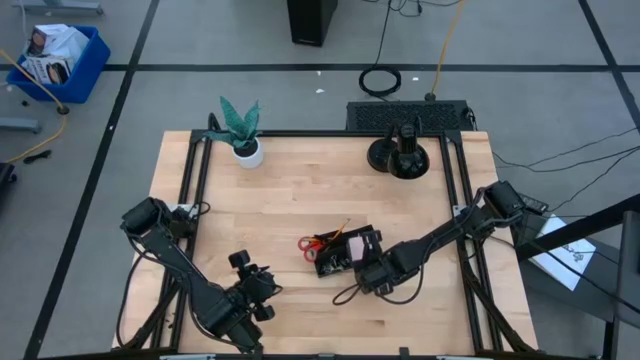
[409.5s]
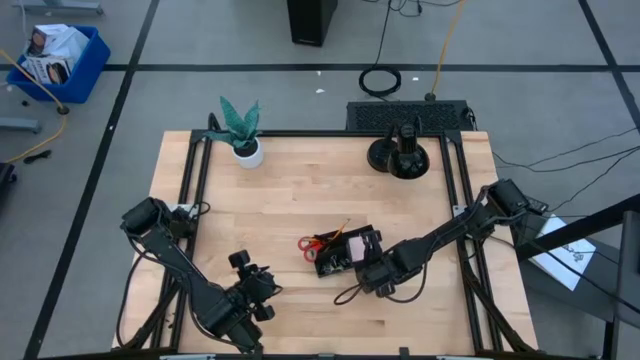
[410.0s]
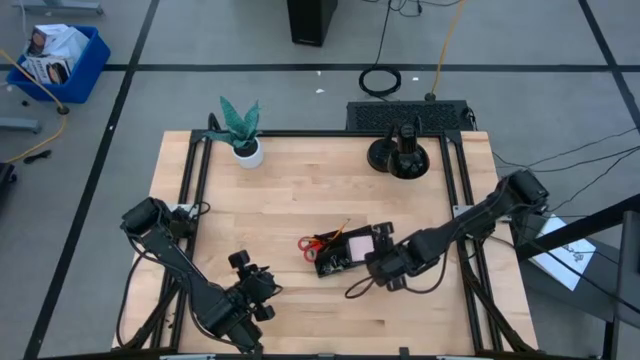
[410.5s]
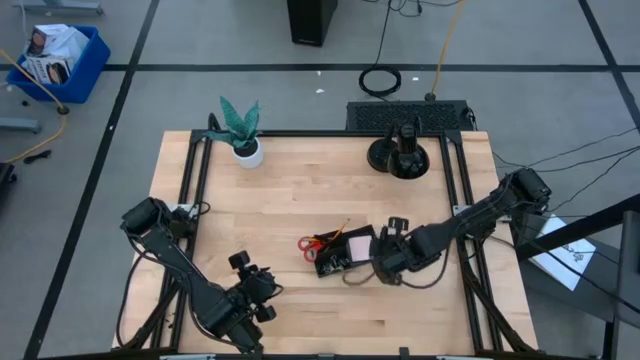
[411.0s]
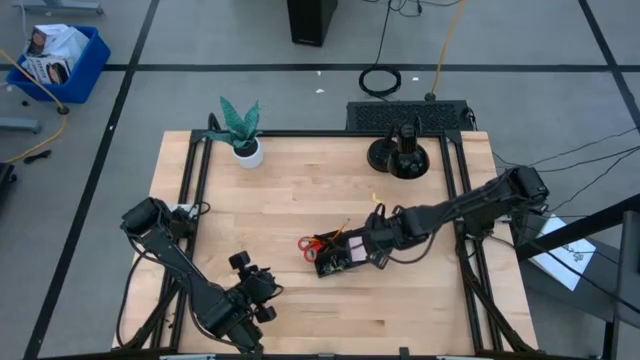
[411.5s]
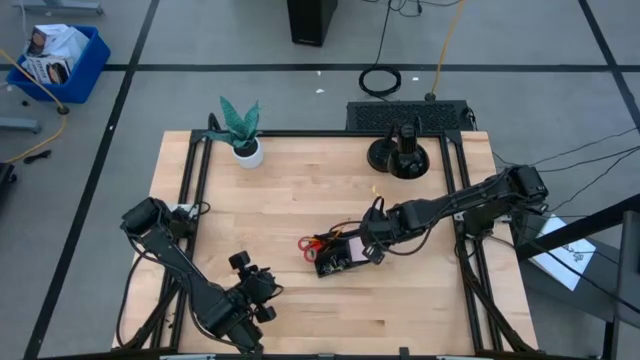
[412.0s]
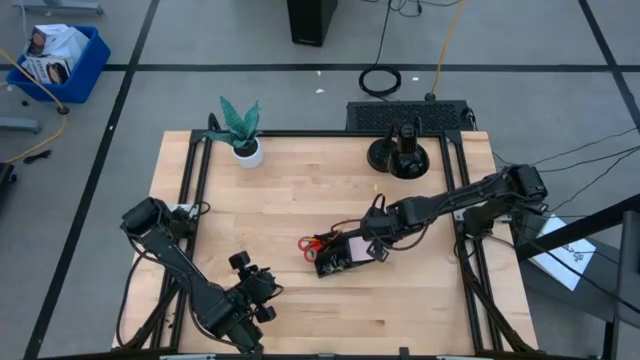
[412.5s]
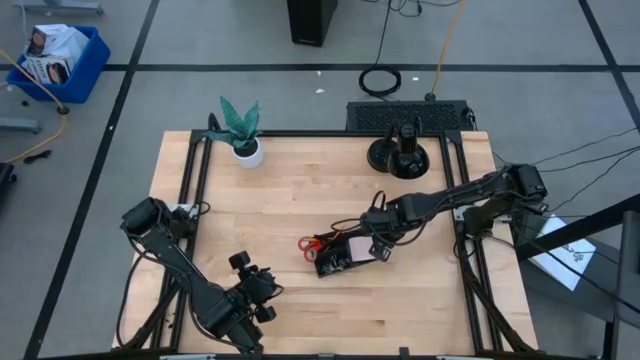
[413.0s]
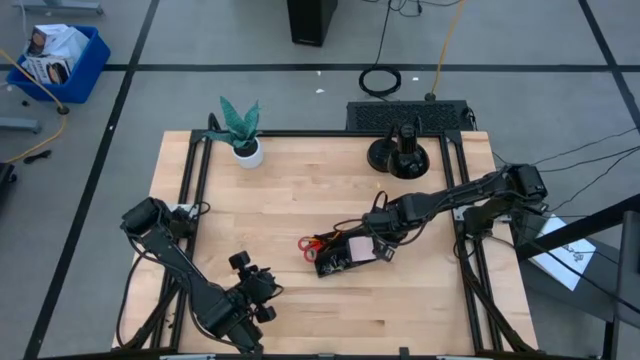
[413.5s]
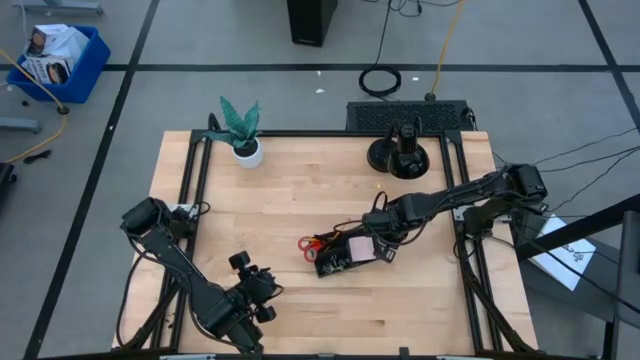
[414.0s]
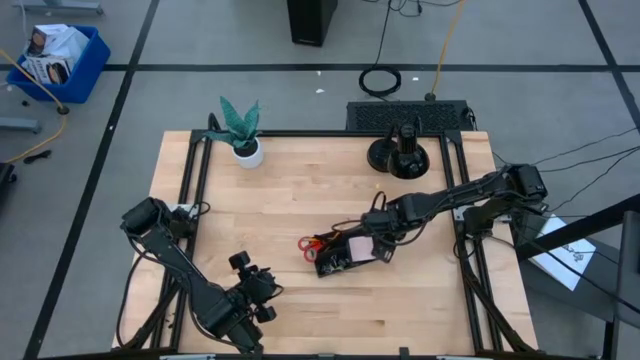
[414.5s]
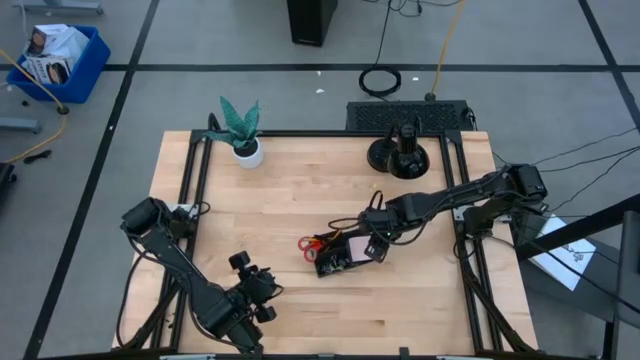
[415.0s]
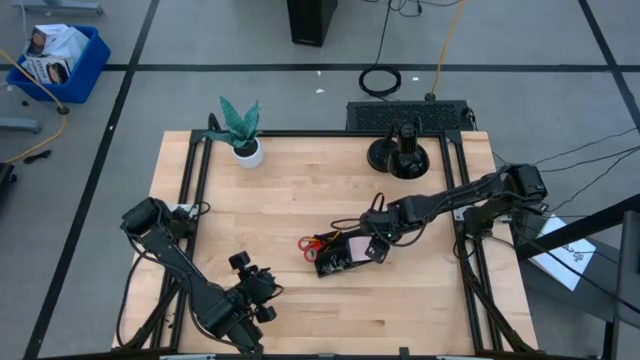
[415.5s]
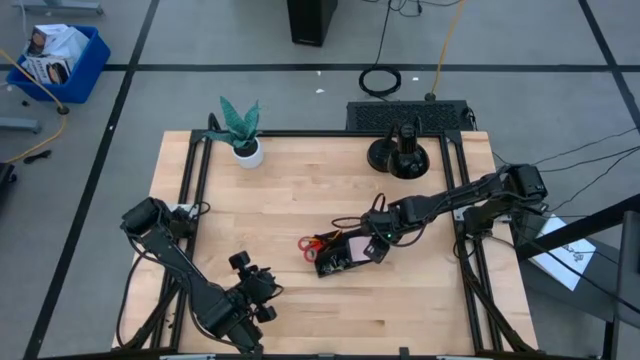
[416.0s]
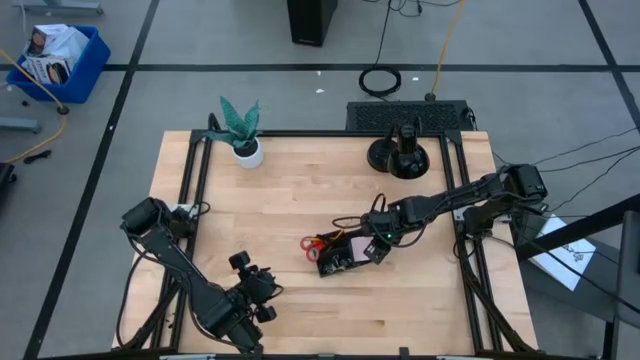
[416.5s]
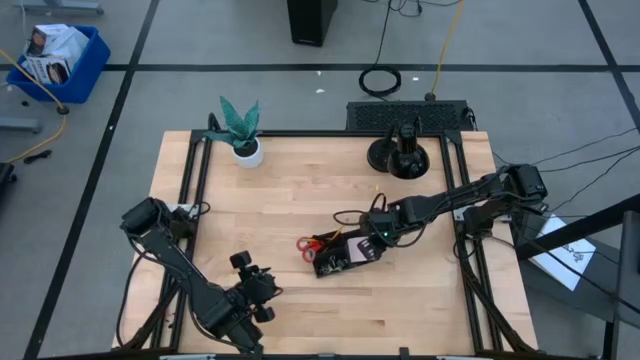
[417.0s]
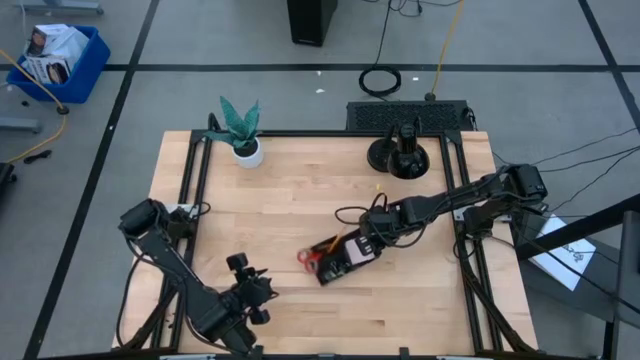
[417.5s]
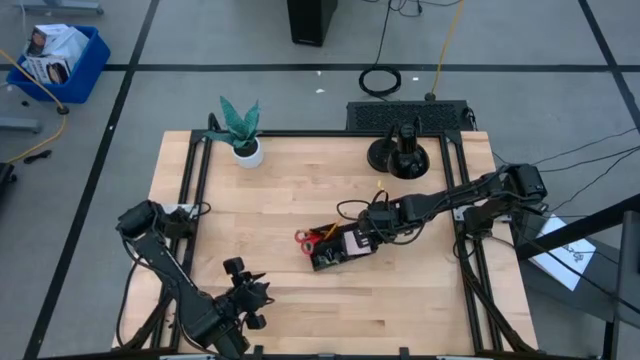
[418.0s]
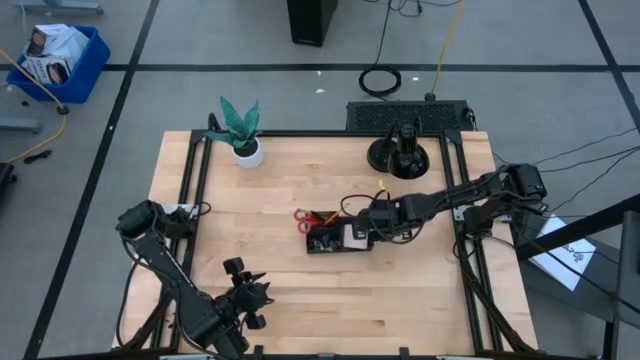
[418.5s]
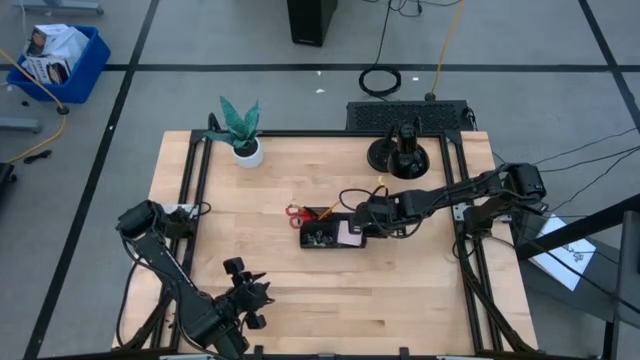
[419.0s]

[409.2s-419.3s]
Task: Pick and place office supplies into organizer
Adjust the black desk organizer on the table

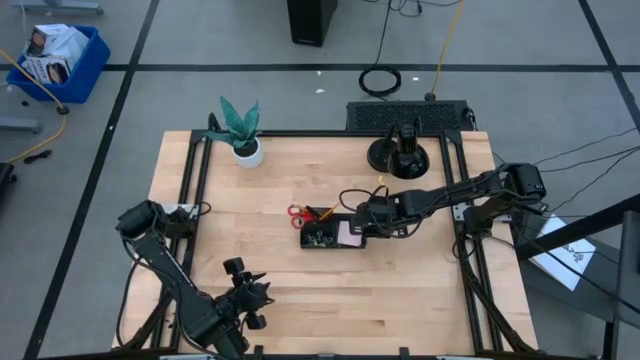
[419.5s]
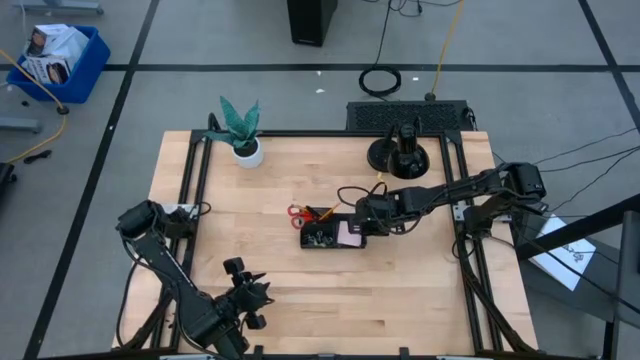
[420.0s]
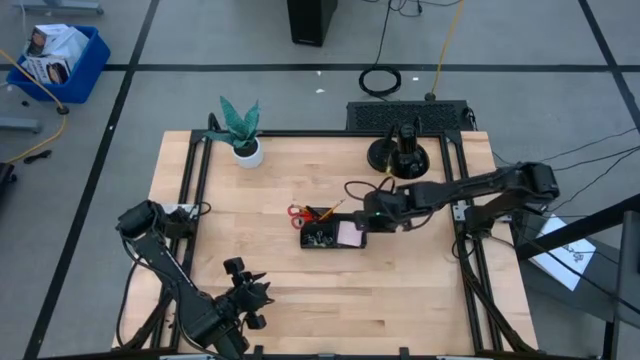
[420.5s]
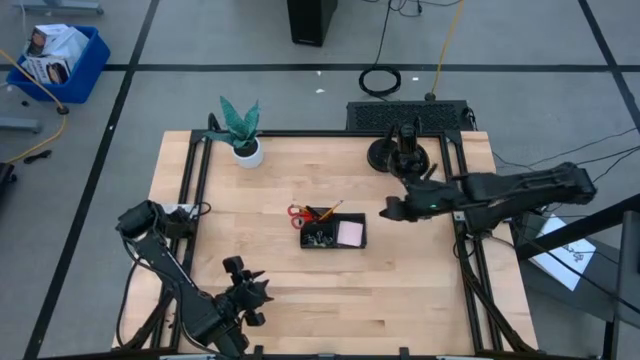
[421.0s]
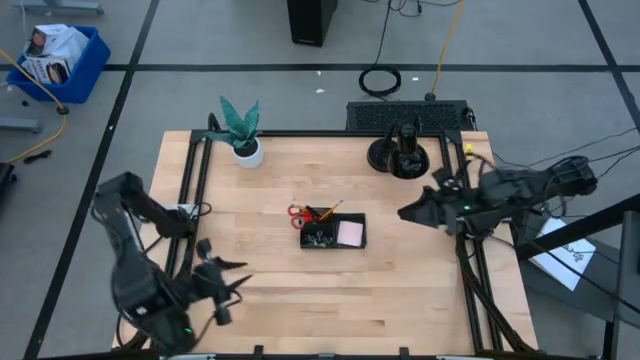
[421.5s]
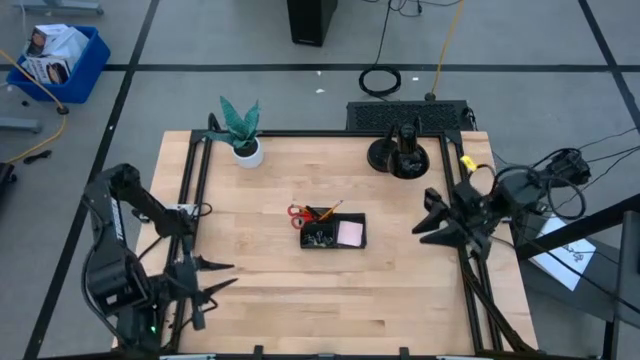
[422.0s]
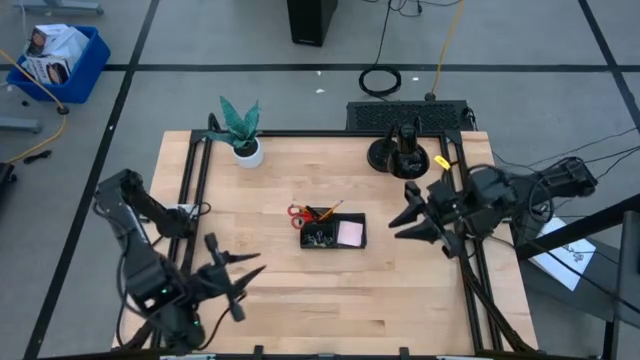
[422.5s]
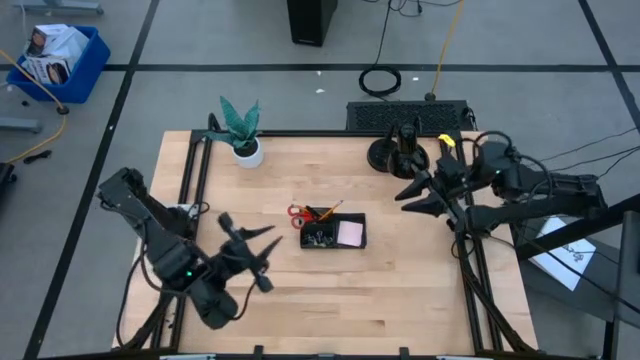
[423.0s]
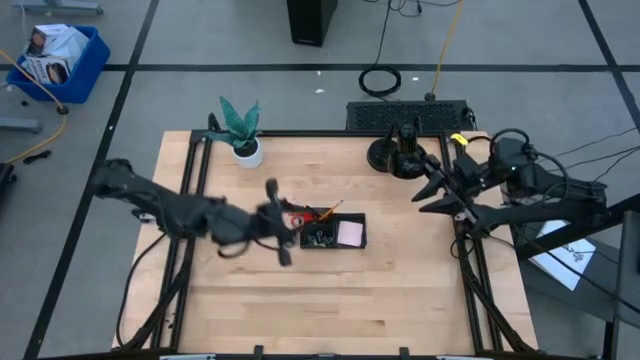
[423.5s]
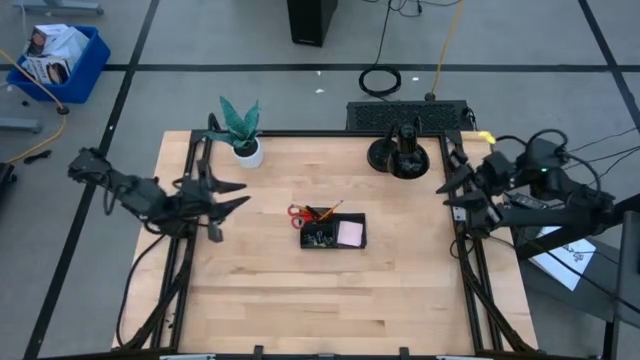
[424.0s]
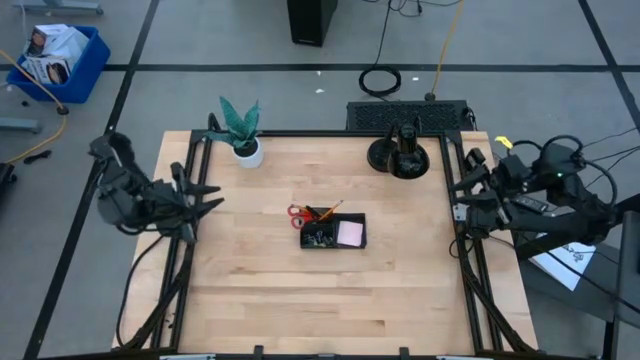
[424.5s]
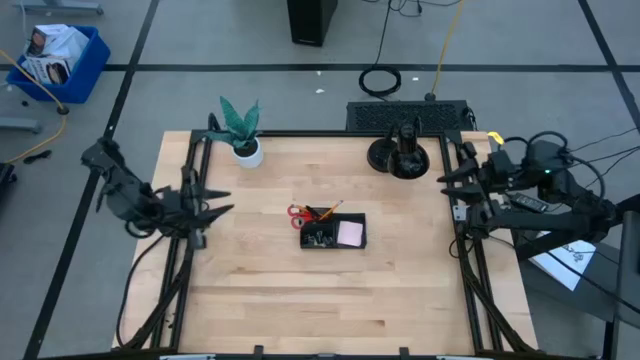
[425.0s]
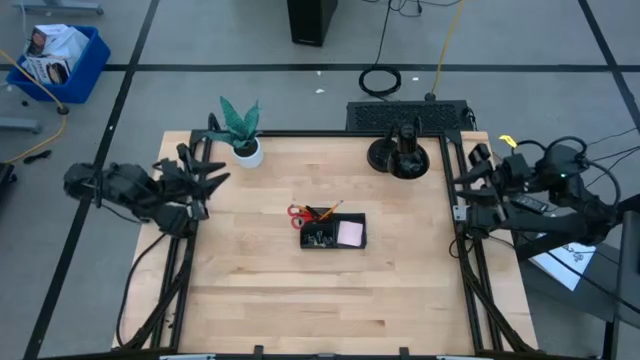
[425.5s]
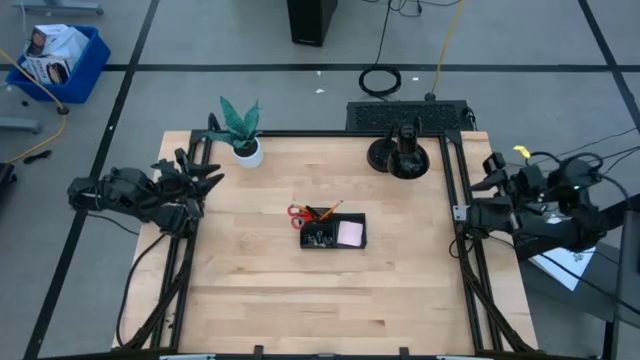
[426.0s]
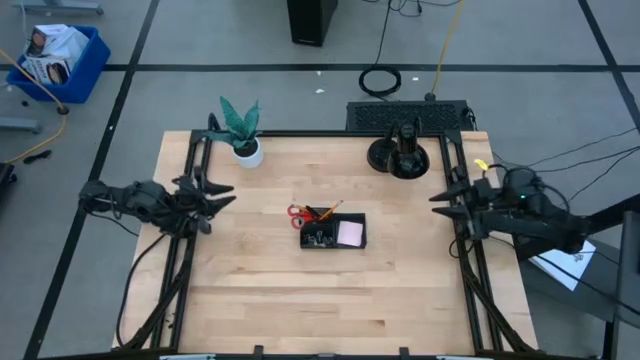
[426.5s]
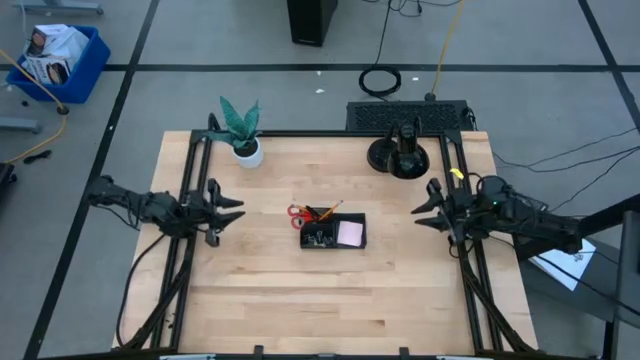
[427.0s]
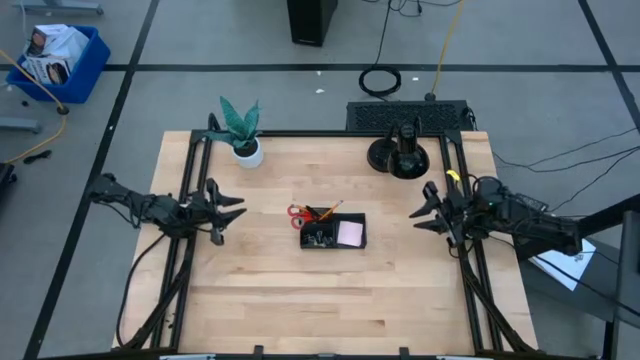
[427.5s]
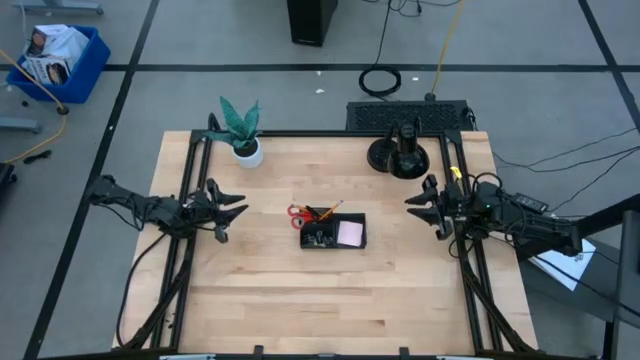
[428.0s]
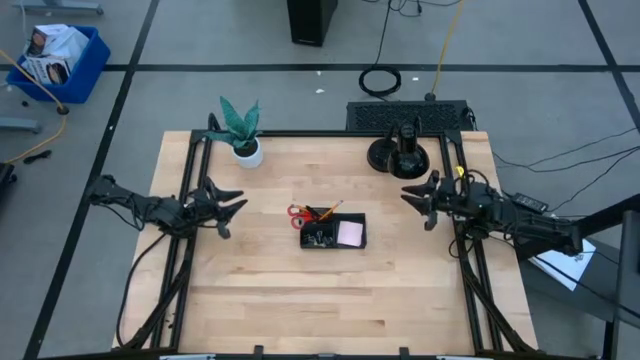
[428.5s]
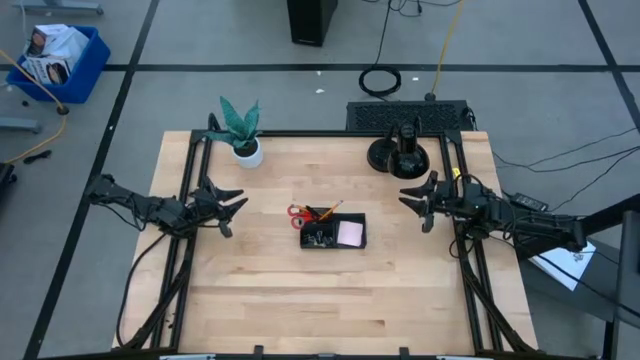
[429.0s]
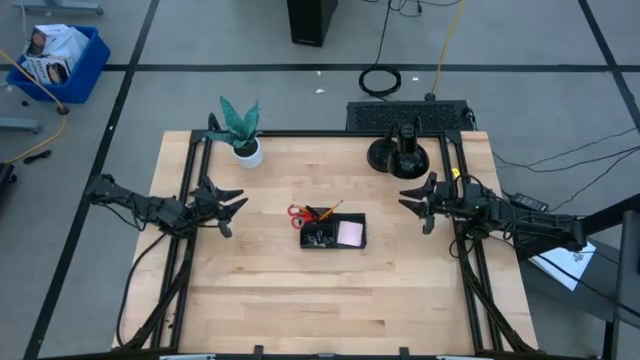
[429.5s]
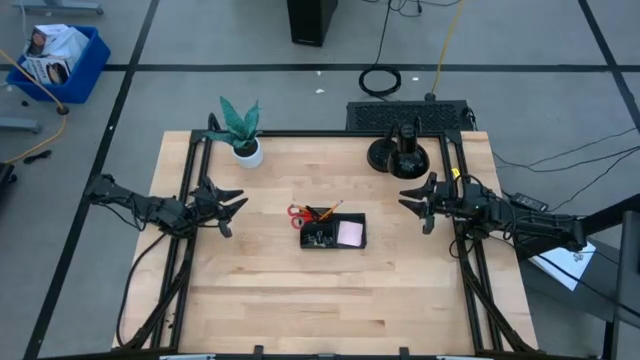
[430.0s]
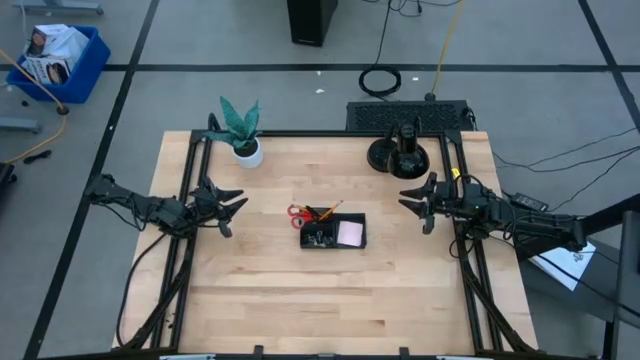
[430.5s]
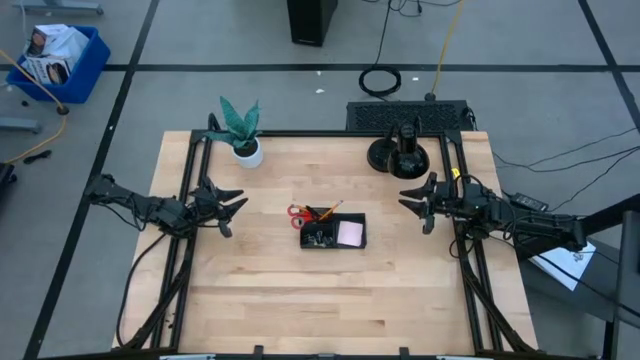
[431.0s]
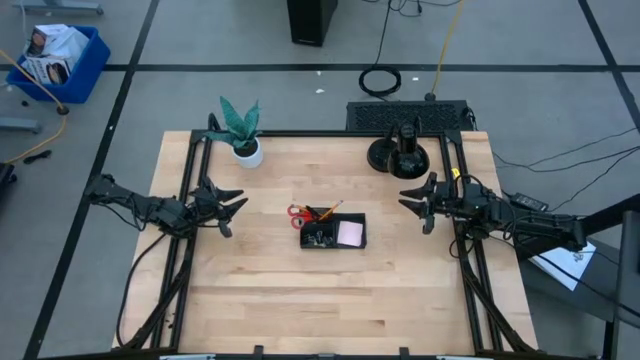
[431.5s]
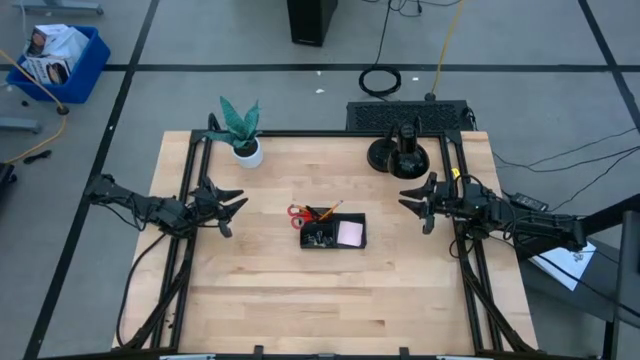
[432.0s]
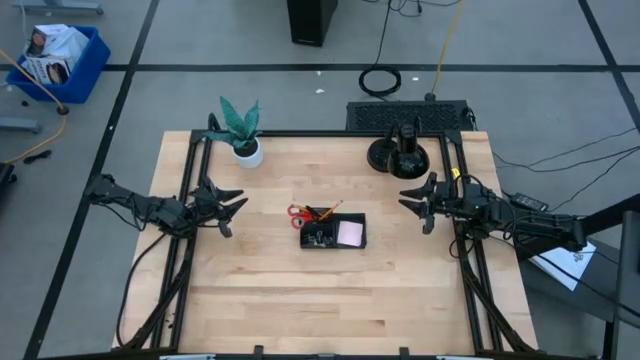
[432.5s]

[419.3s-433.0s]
Return to Home Position
